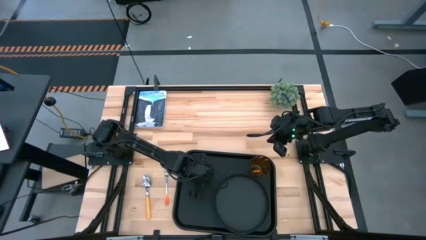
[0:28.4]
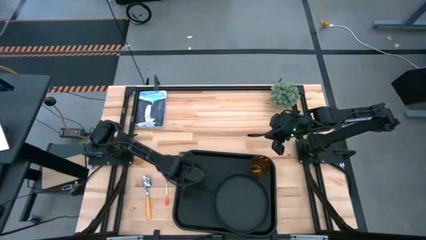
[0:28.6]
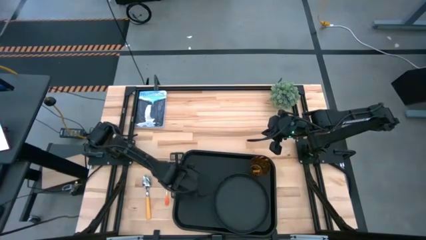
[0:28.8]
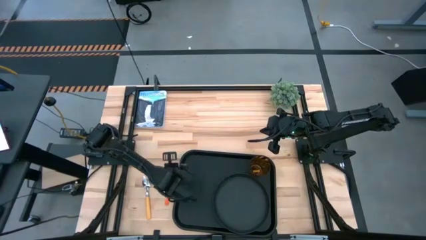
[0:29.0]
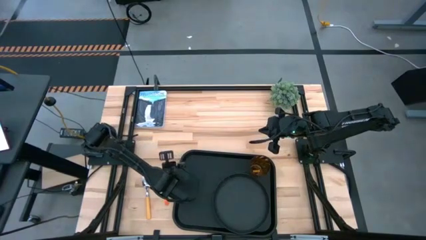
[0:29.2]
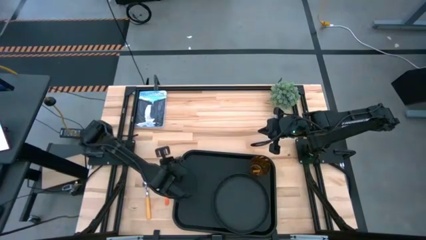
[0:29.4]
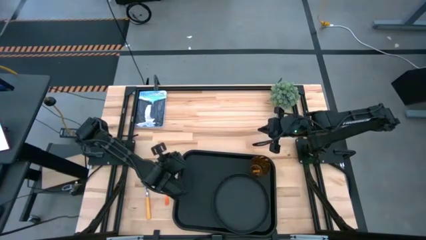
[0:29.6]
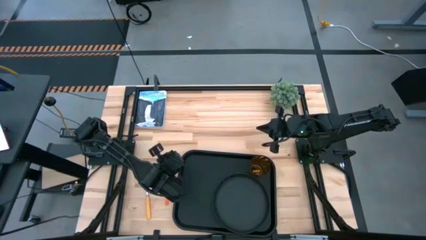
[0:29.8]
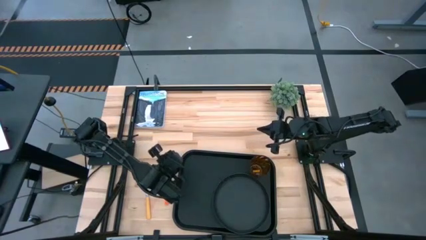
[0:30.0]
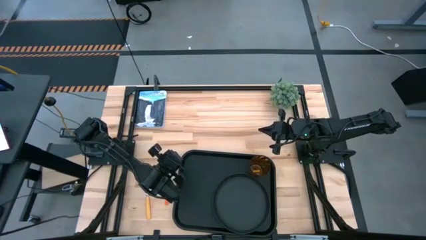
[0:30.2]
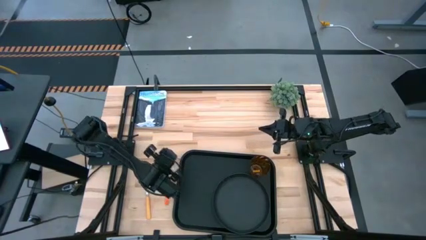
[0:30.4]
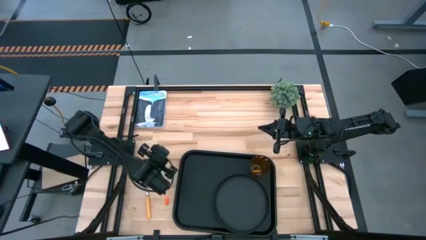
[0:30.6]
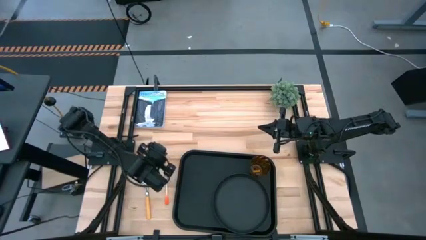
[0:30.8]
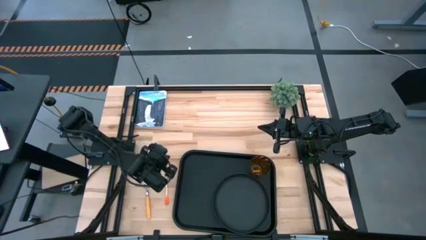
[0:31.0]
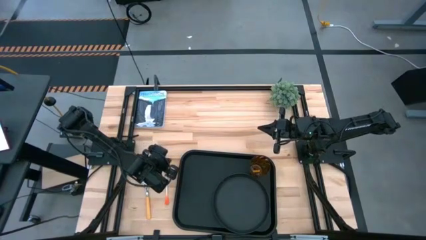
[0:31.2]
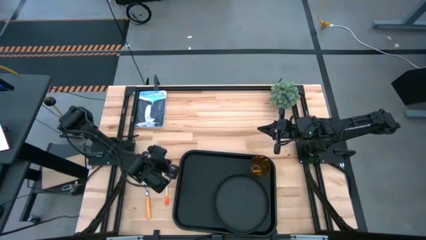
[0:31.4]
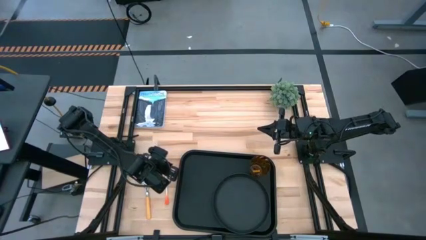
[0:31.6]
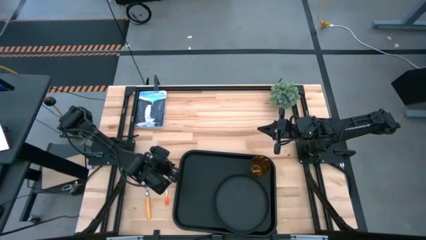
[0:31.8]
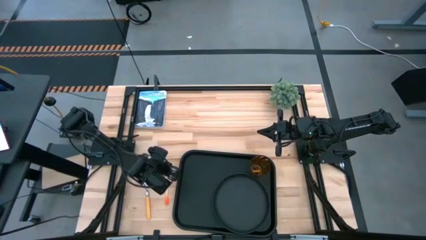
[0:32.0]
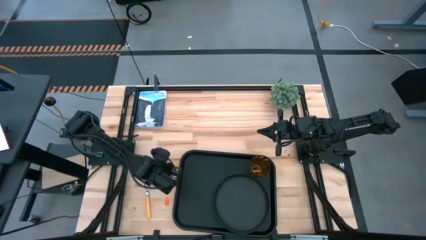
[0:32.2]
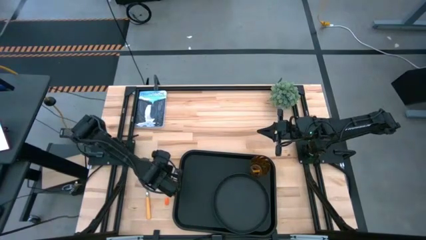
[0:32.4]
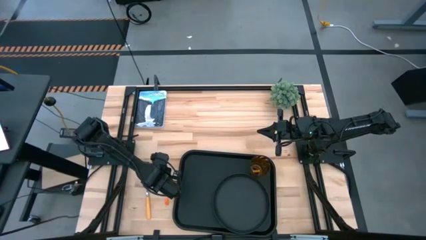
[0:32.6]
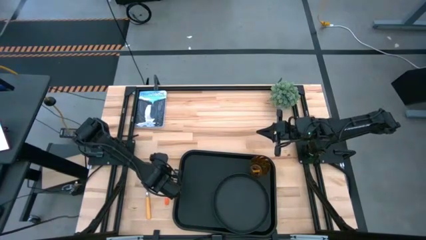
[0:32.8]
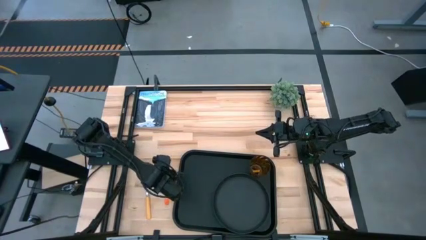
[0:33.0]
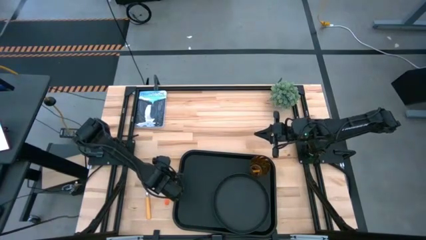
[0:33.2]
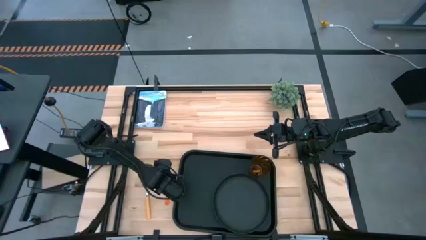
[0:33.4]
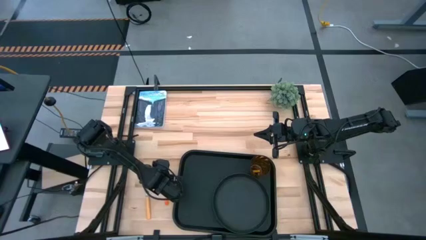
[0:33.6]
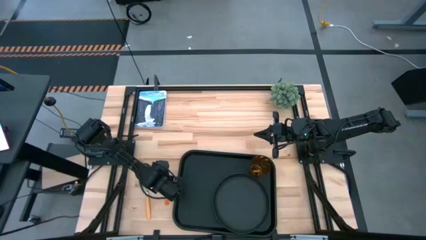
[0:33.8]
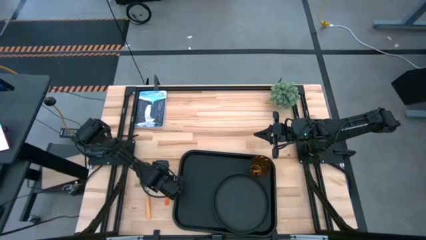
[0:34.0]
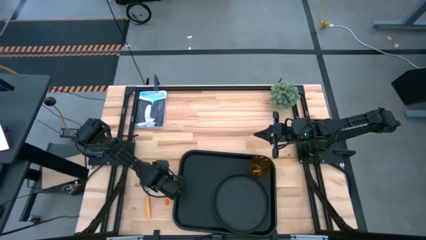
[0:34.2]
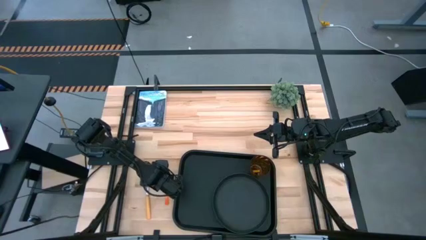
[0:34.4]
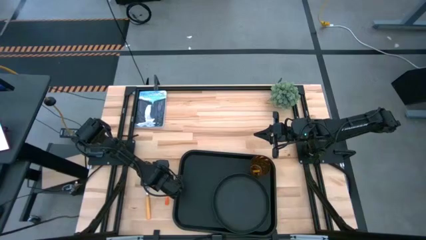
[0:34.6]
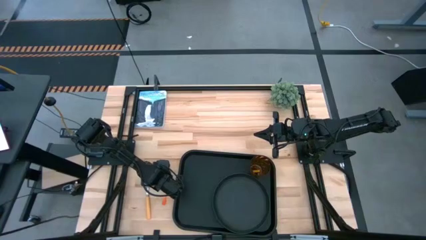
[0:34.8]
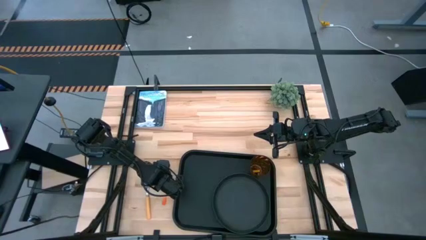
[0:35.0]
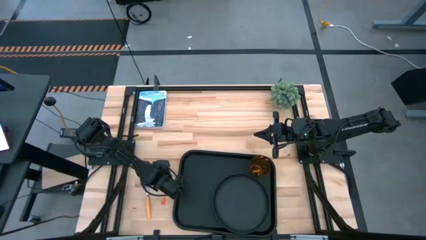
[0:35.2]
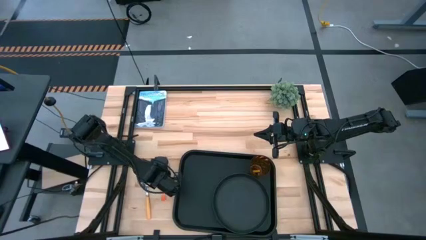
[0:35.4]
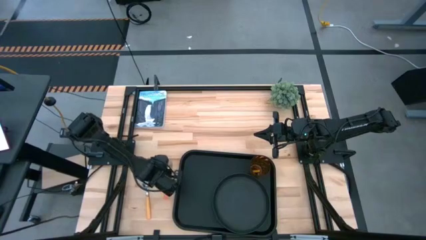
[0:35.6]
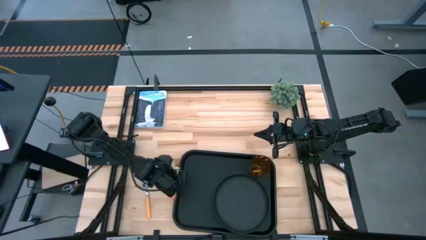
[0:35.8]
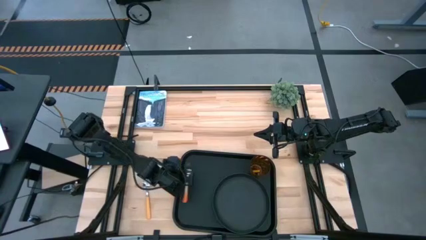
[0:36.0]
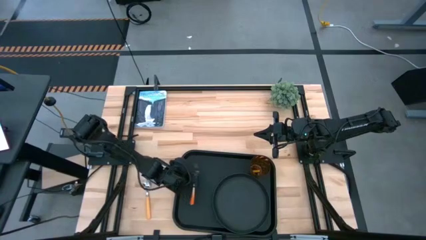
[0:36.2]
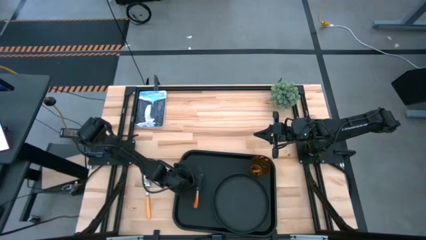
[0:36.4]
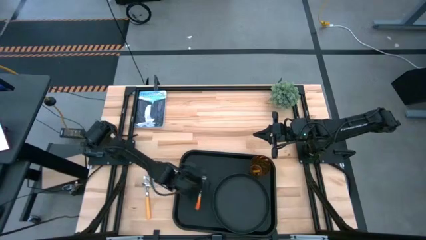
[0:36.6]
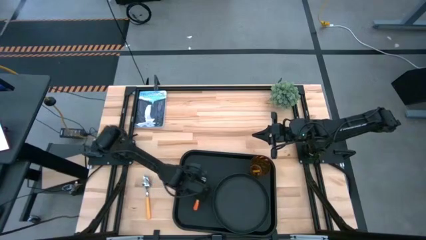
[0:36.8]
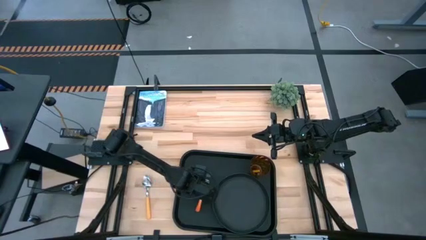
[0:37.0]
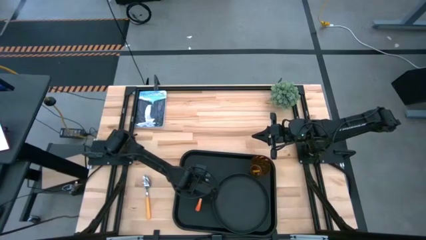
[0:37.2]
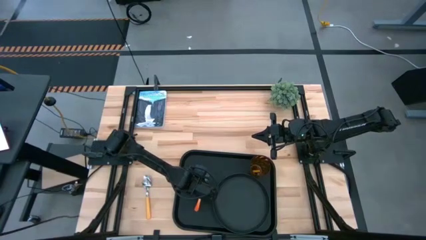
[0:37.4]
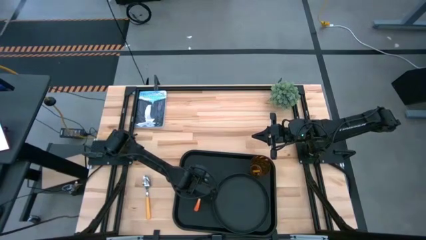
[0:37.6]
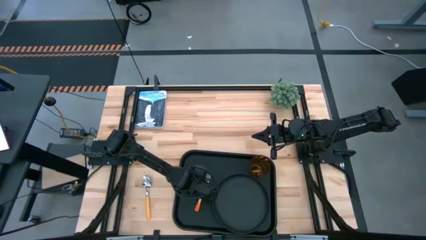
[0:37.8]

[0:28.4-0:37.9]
Task: Pick and place plate/cup/fork/spoon on tray
Put the orange fork on the black tray to the left of the black plate

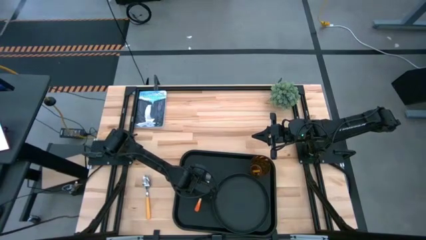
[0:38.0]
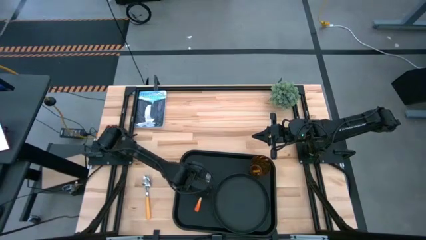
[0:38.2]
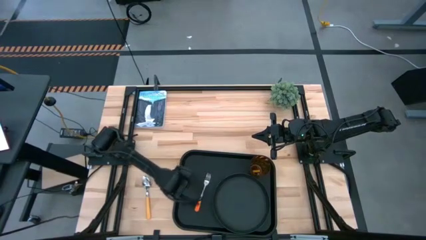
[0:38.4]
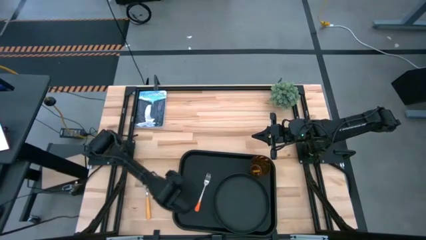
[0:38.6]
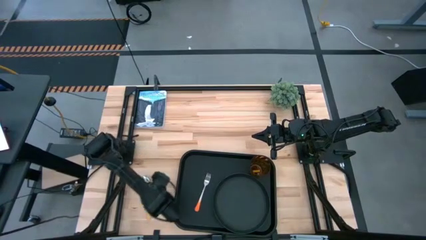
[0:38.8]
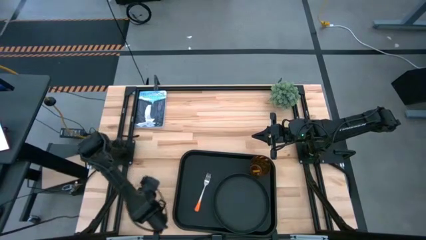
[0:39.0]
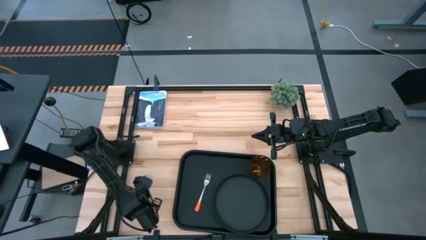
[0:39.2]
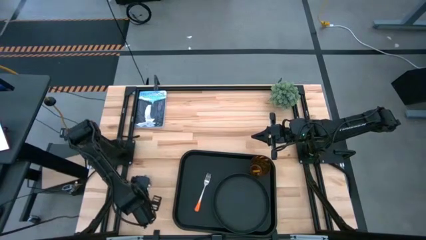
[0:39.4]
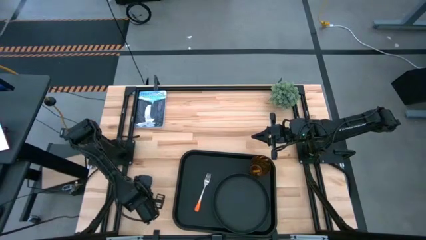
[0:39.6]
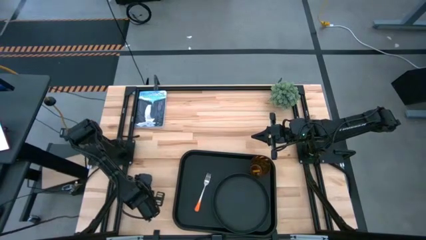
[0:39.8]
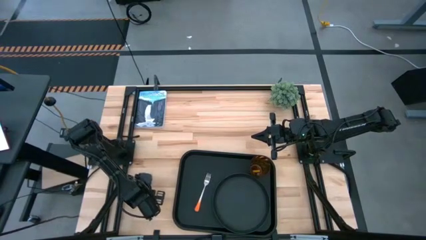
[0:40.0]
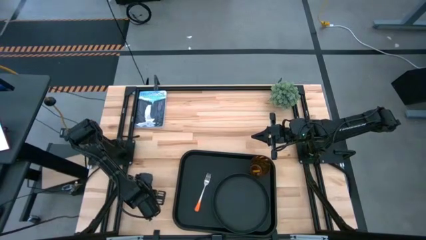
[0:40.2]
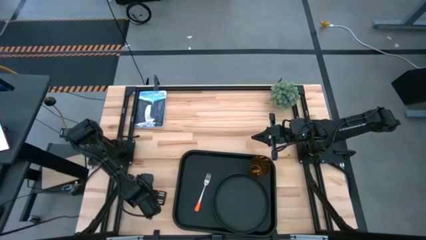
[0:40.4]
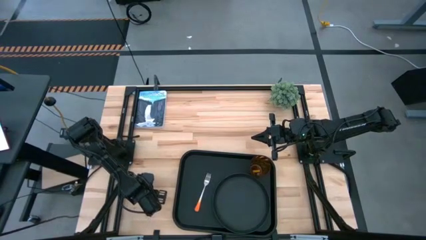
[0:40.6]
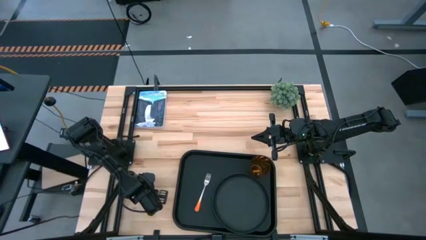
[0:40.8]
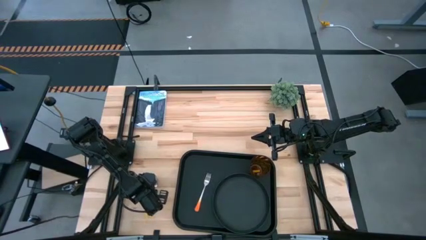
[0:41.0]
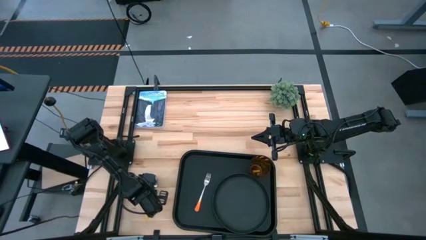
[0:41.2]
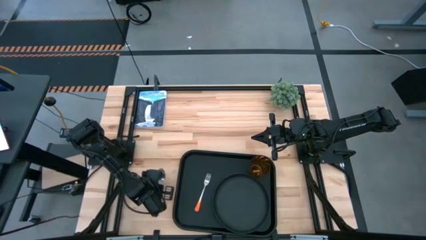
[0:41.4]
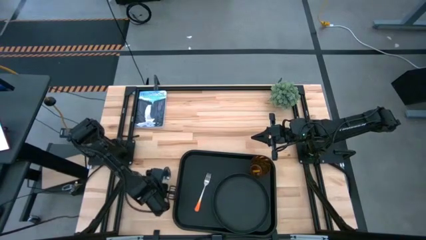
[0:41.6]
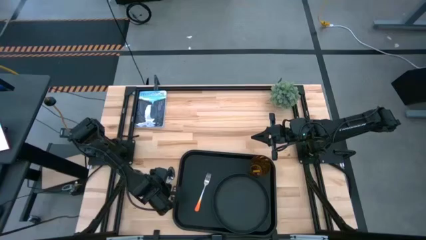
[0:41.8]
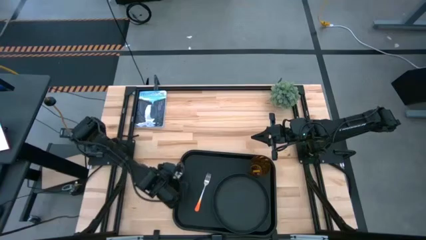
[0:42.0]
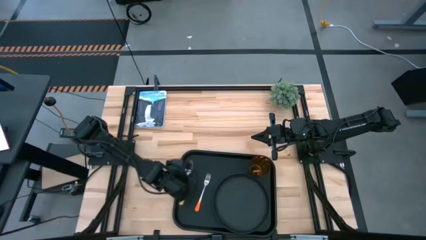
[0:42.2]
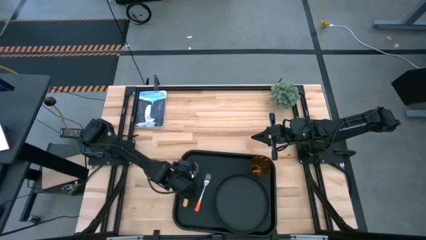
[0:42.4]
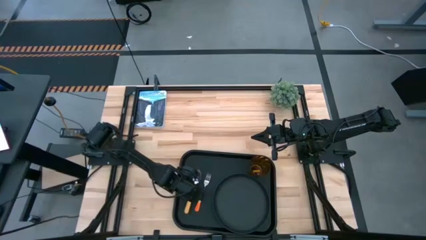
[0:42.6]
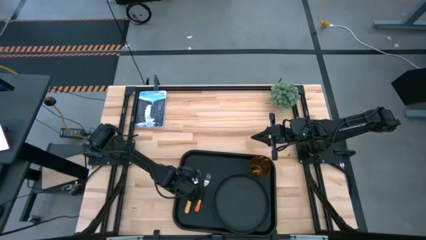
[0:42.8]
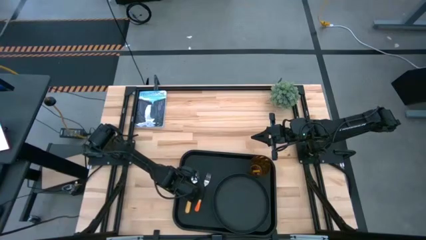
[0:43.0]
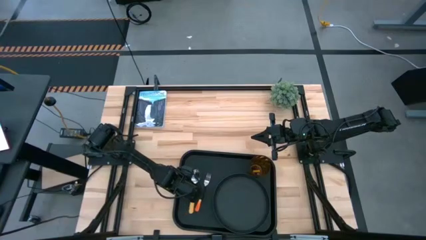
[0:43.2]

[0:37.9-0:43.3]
Put the yellow spoon on the black tray to the left of the orange fork

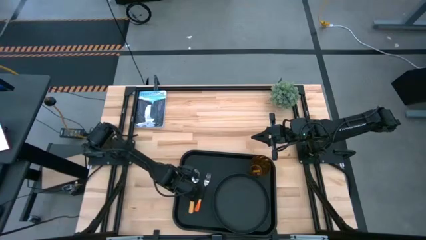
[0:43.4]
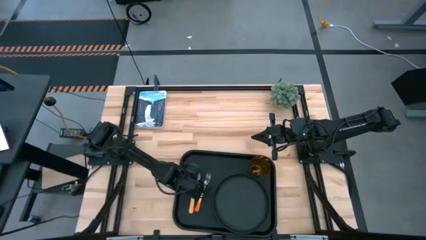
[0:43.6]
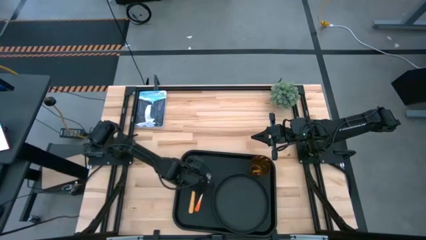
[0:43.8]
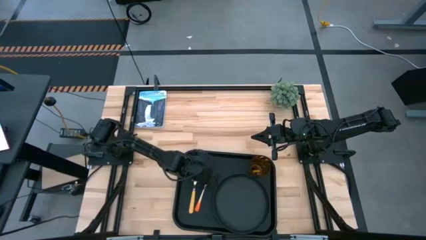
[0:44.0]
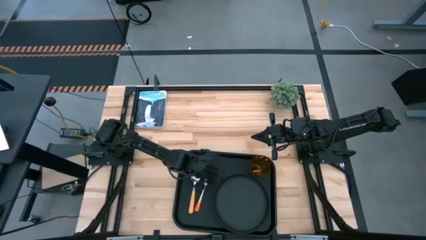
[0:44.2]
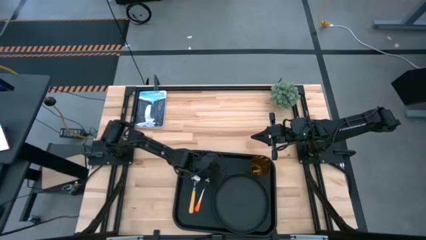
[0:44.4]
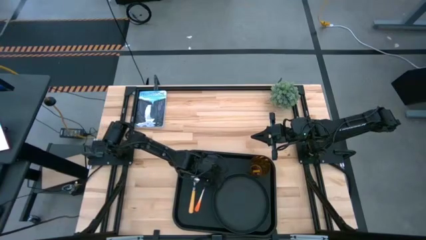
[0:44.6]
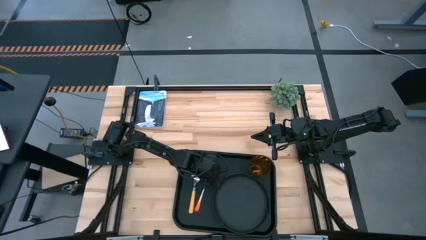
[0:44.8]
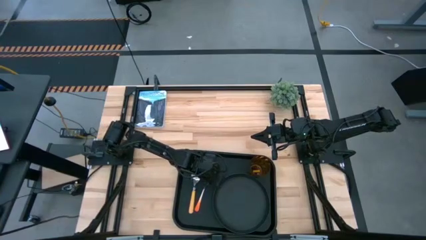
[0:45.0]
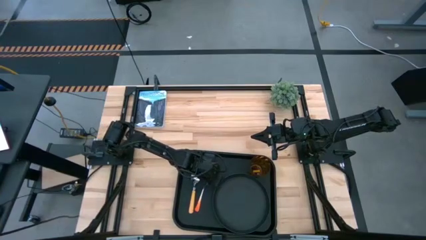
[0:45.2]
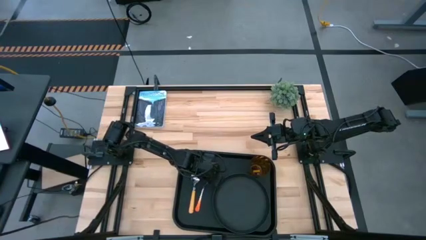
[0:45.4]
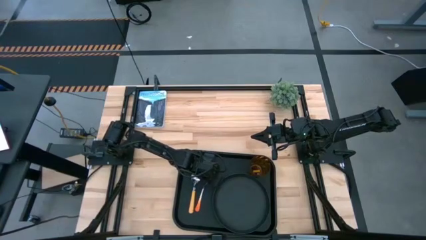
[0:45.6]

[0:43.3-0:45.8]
Adjust the orange fork
